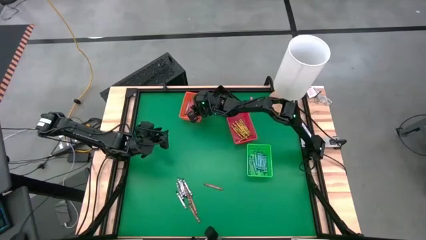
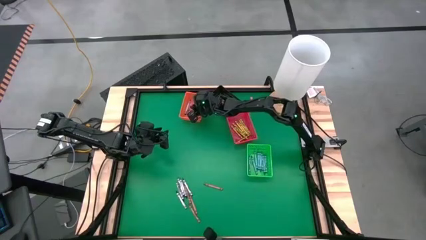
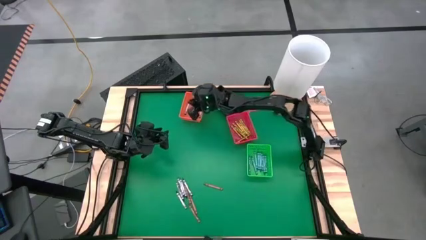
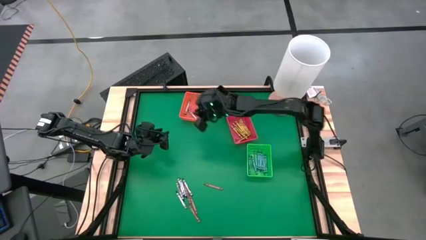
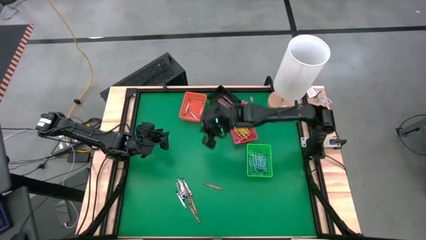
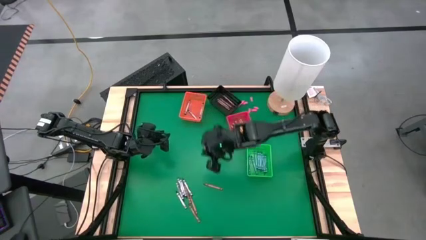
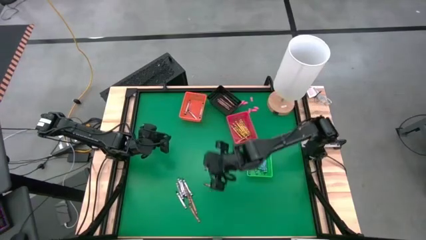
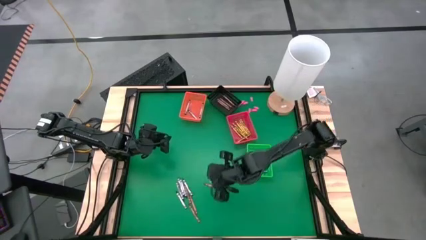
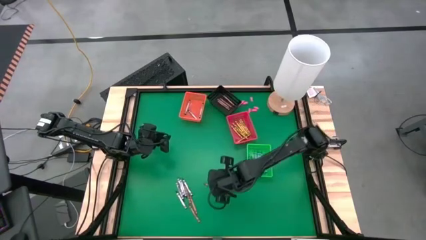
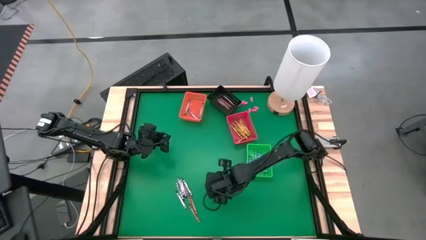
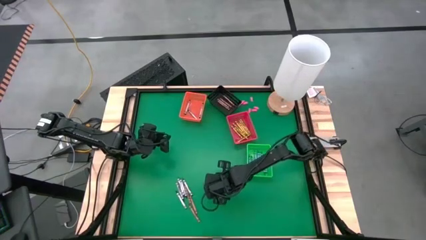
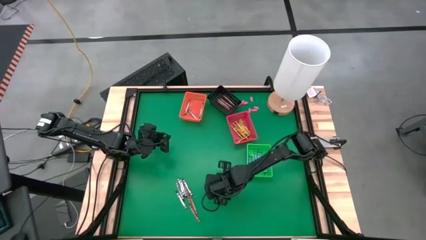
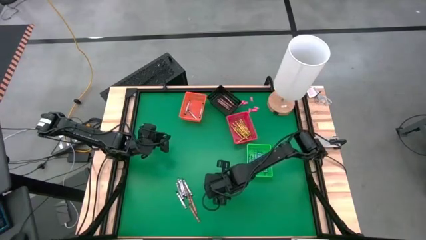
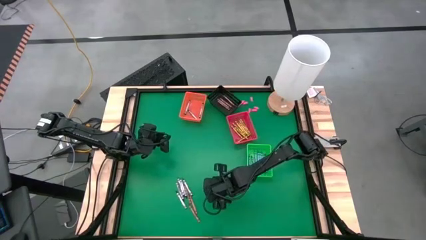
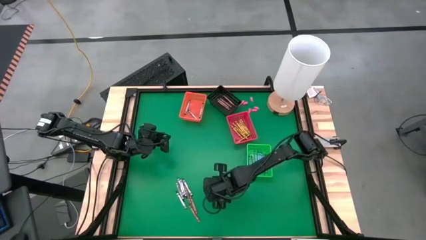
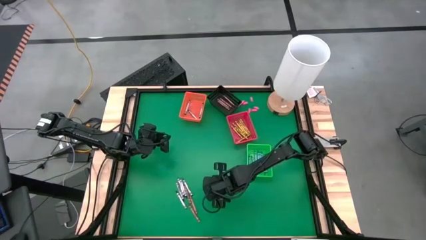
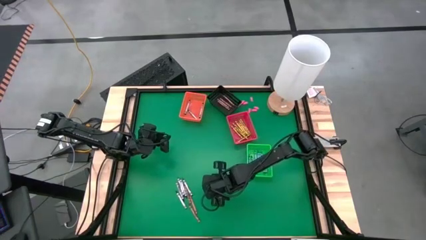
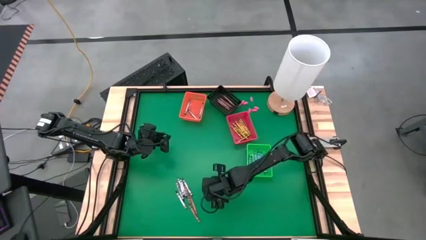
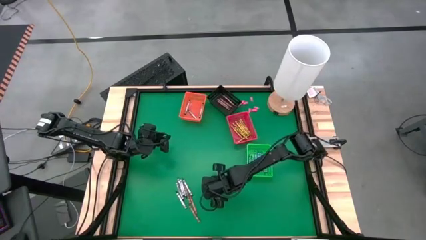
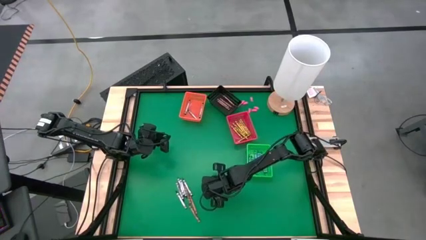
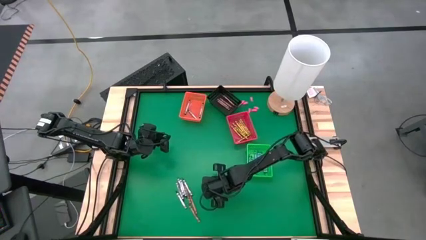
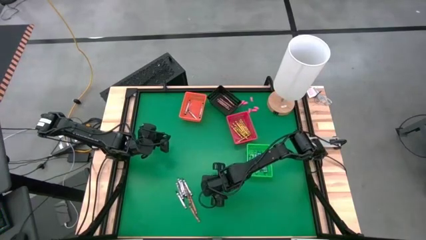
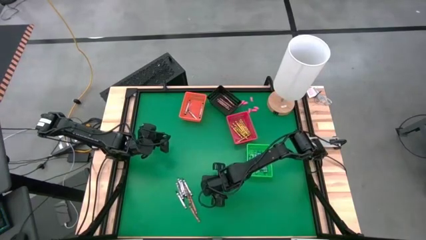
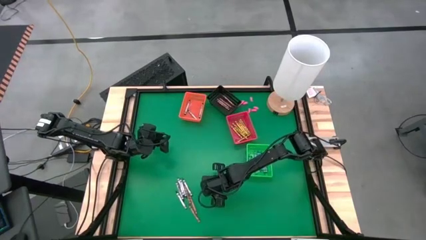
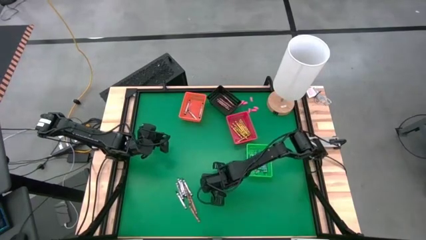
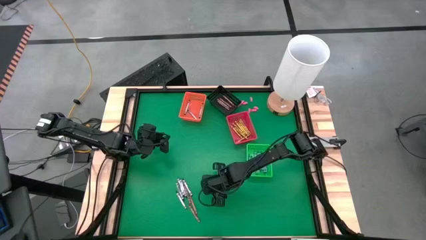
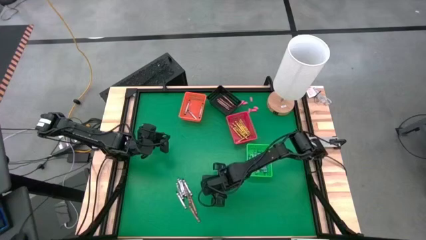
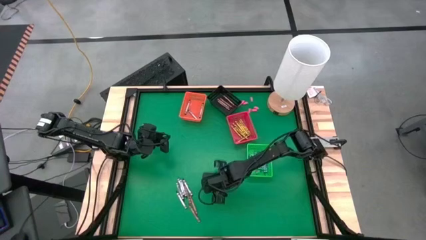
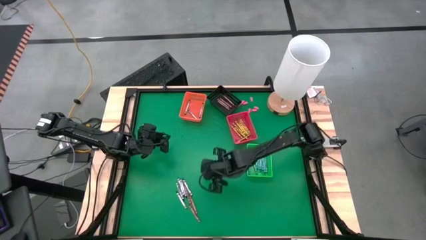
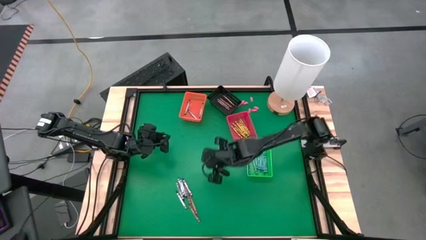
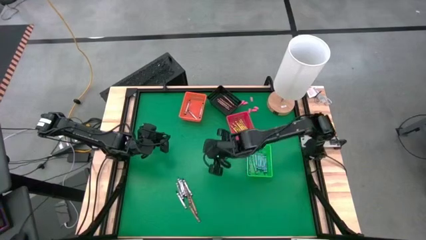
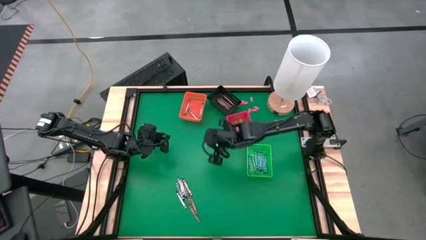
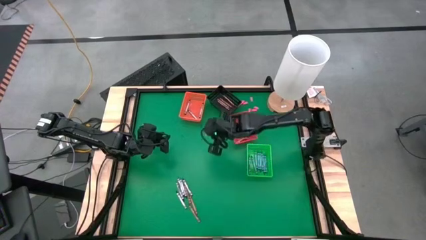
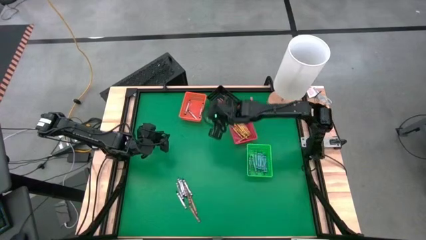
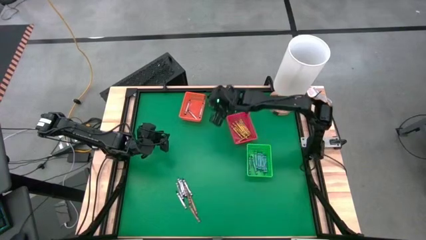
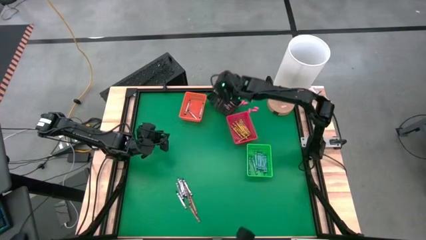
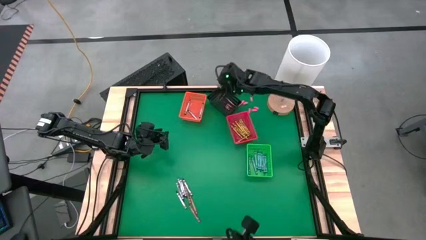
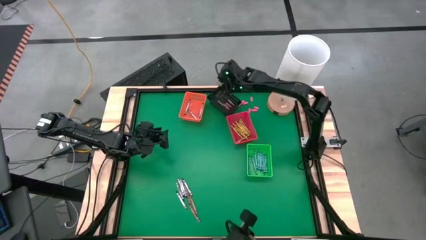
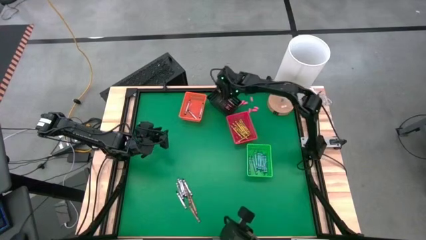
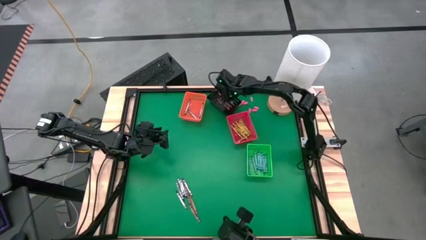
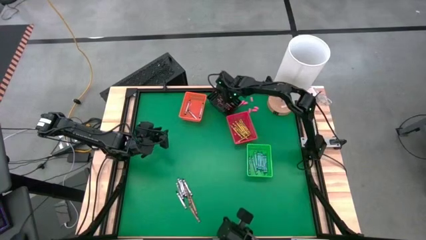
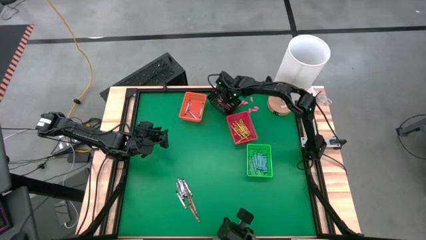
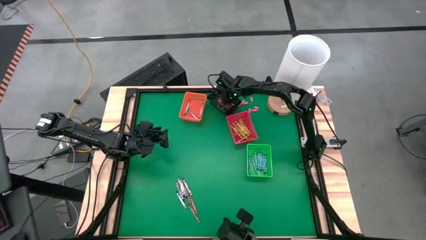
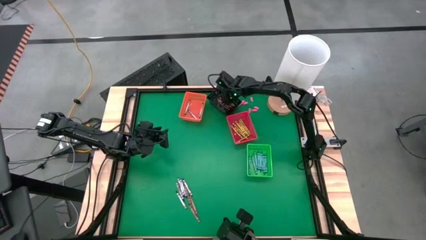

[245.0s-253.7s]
Task: Sort crayons
Put the brown crayon into the black bin

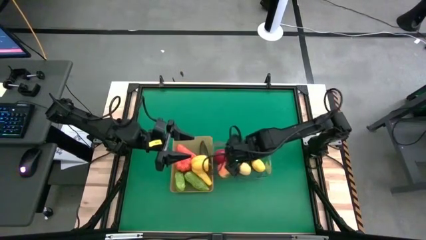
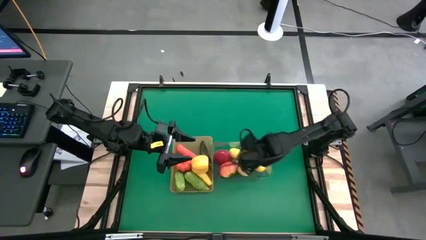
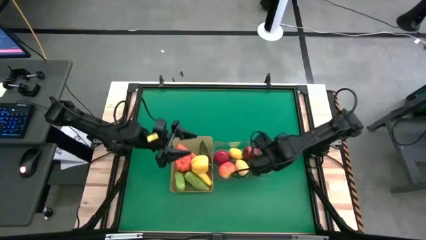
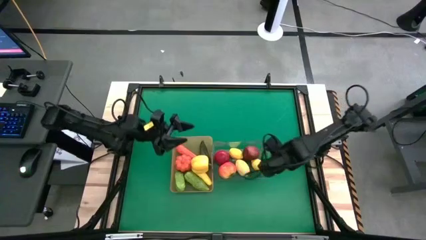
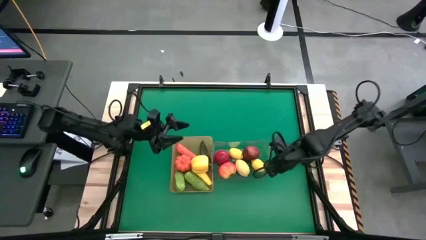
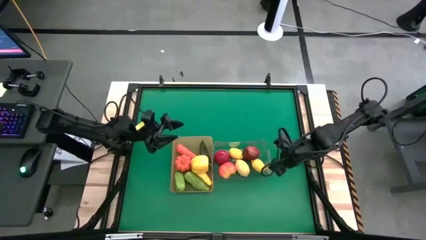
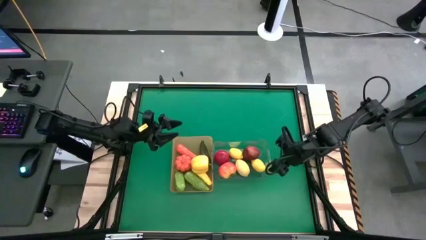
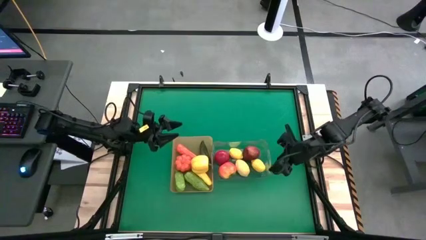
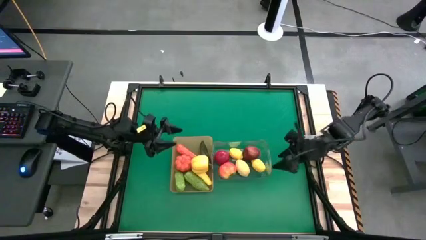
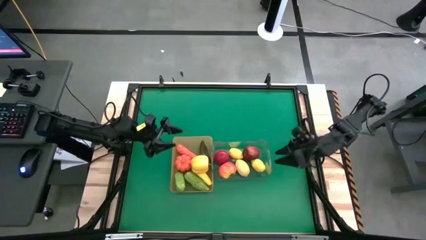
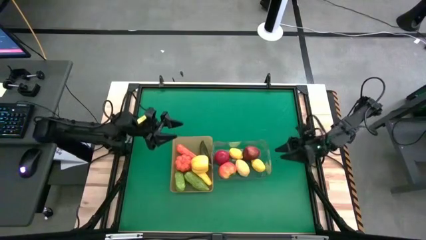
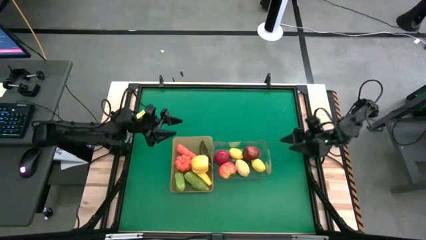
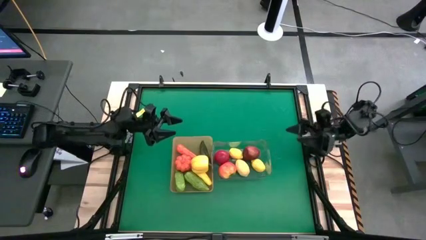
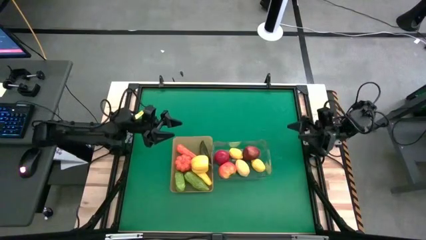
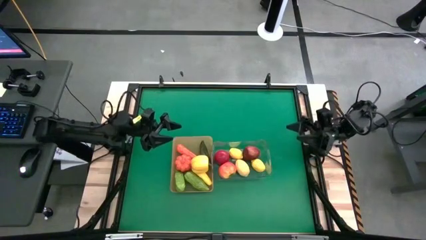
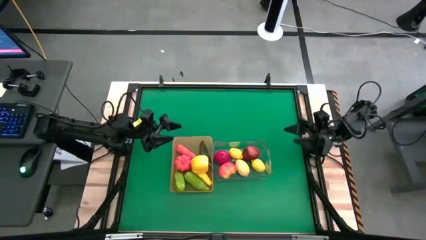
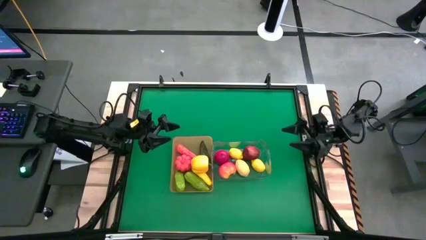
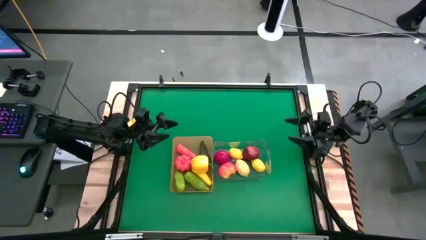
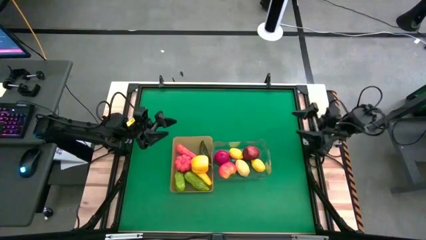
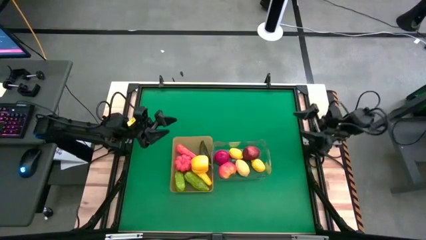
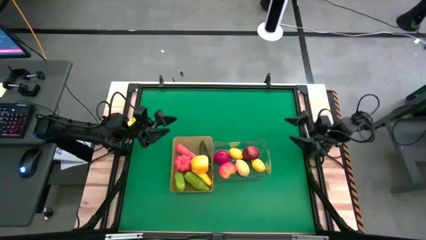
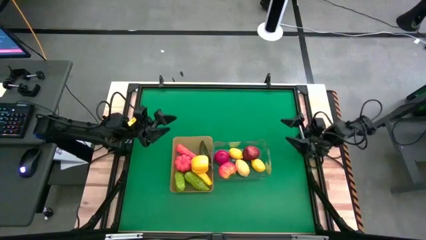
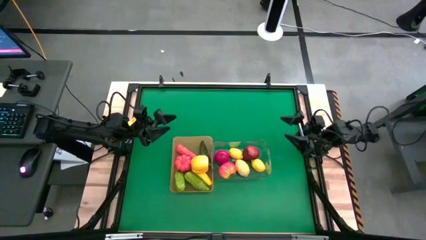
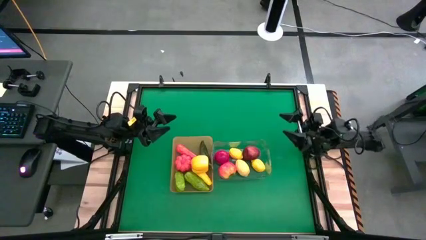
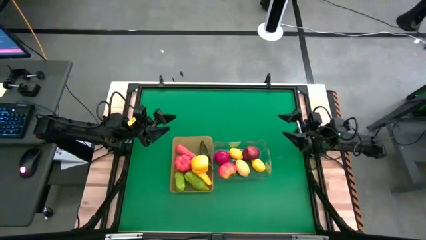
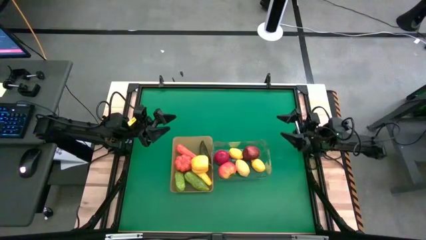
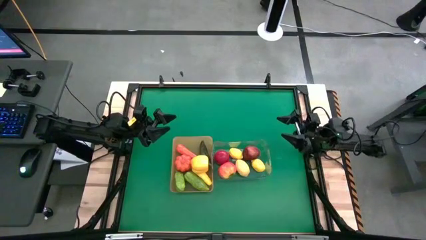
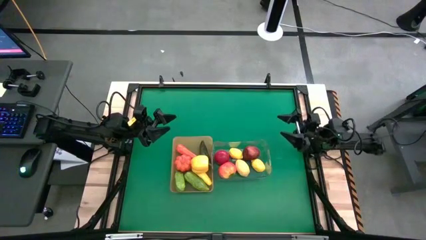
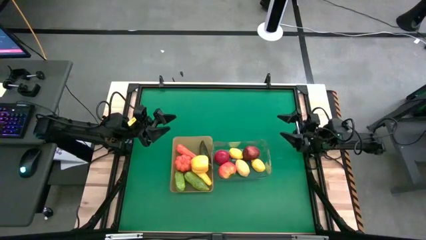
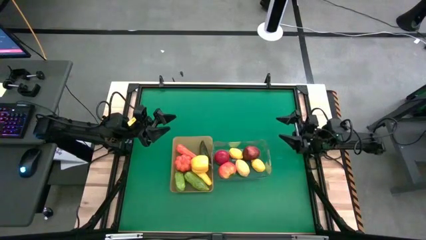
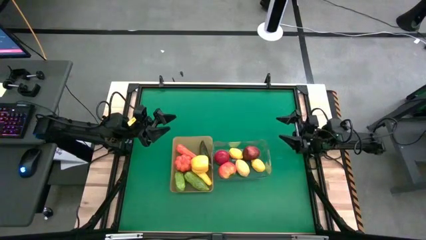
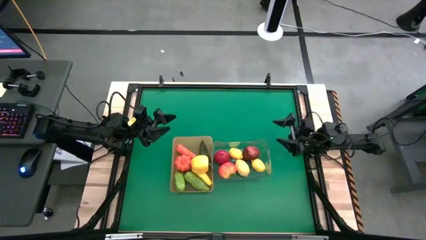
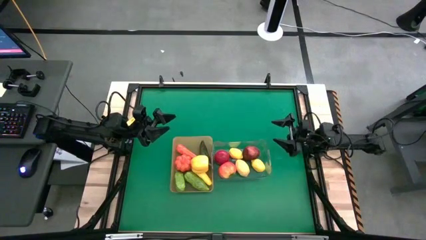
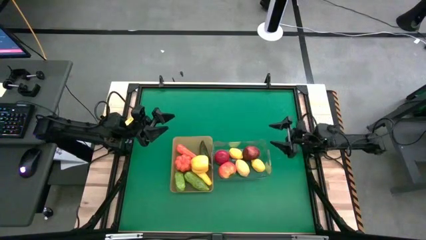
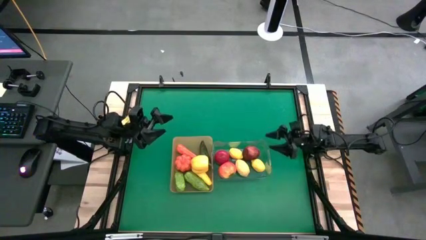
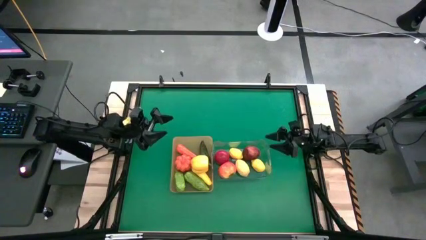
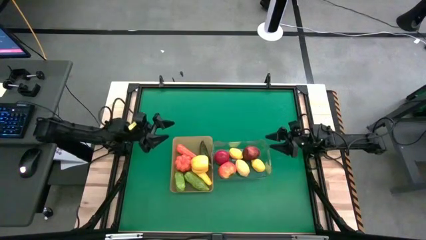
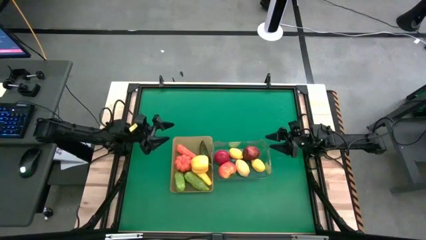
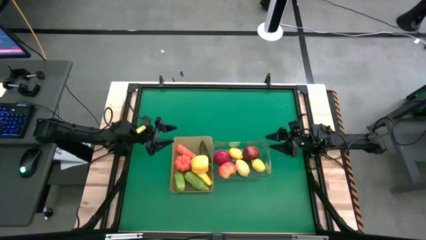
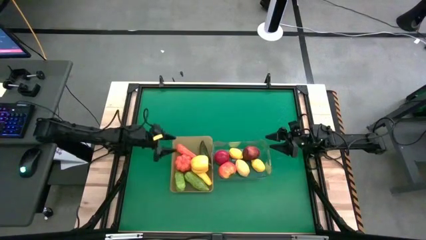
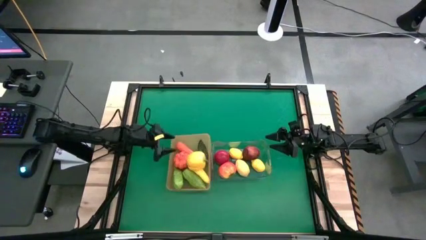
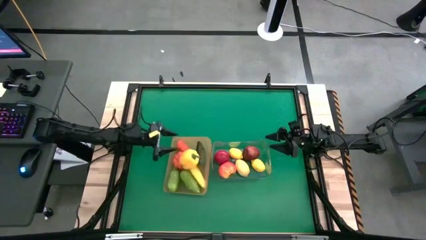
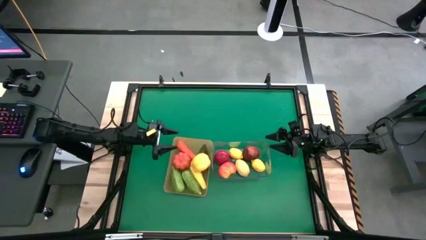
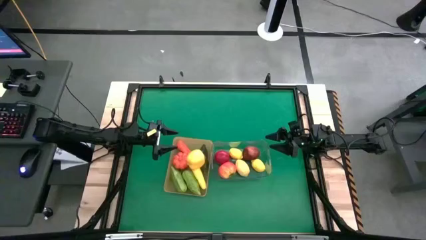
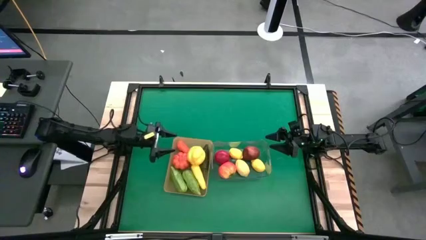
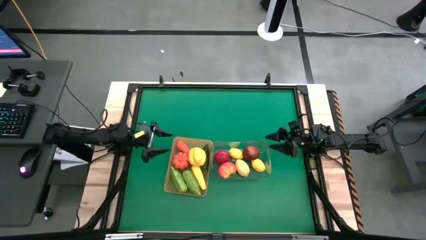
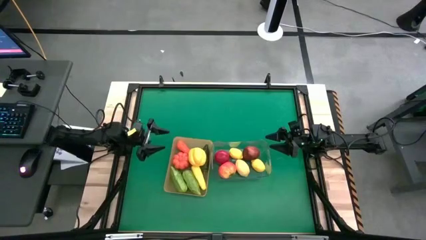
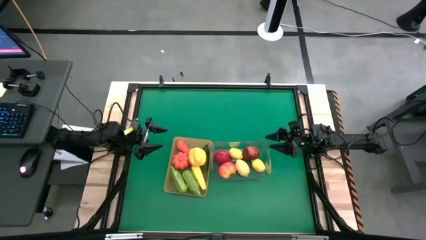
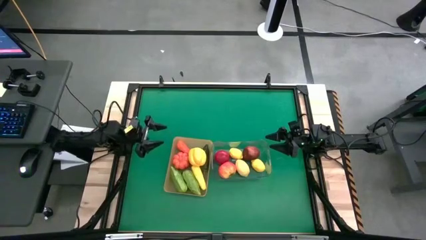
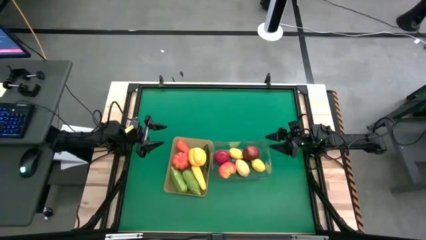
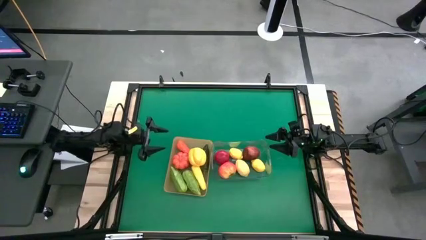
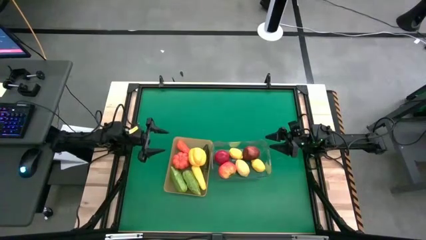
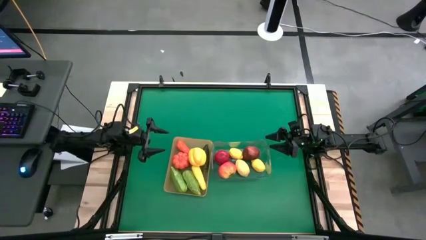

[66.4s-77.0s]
Task: Sort produce into baskets
Return to Home Position
